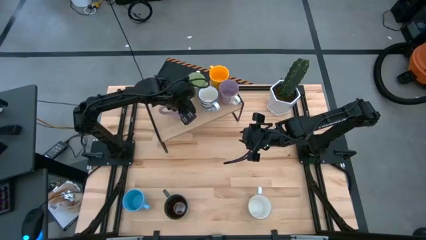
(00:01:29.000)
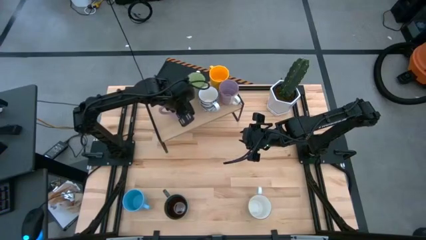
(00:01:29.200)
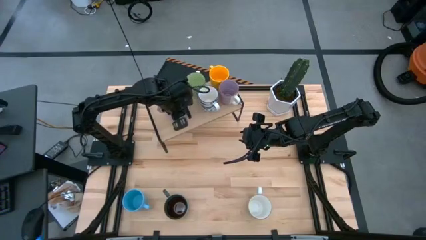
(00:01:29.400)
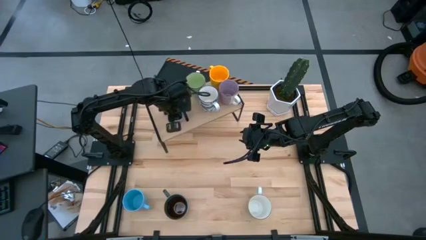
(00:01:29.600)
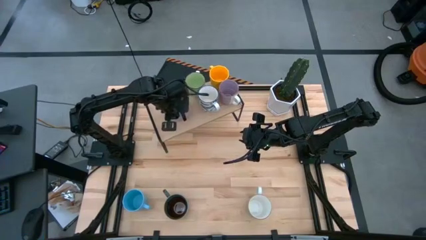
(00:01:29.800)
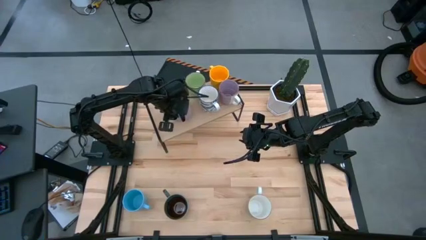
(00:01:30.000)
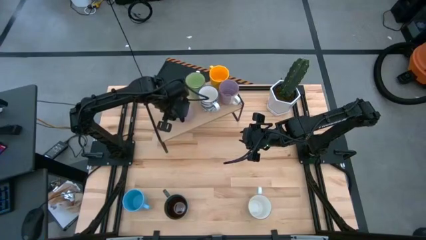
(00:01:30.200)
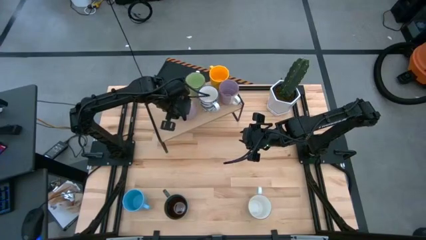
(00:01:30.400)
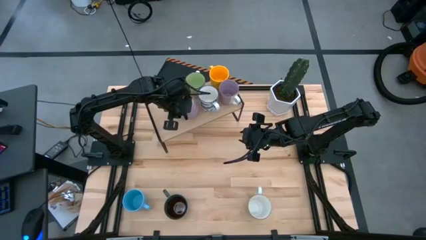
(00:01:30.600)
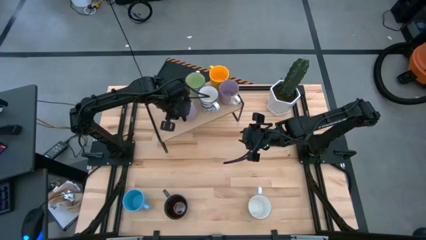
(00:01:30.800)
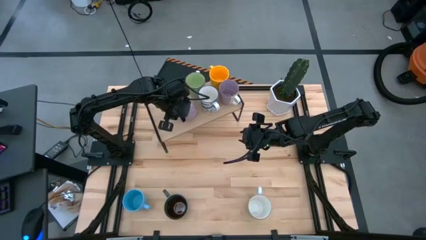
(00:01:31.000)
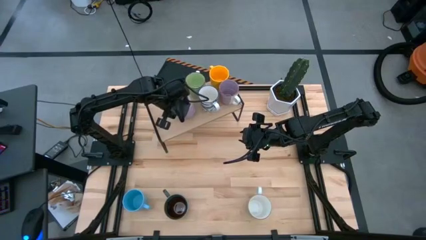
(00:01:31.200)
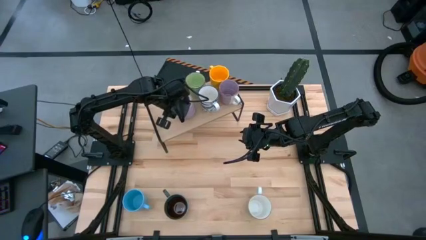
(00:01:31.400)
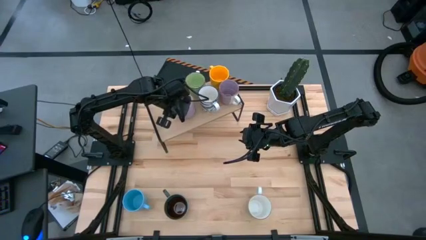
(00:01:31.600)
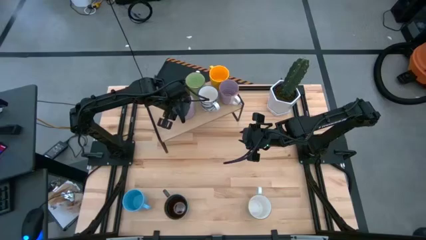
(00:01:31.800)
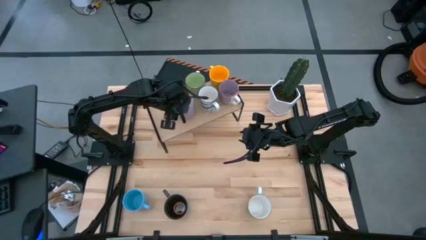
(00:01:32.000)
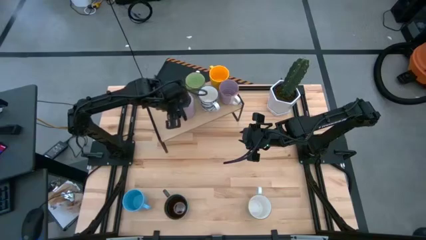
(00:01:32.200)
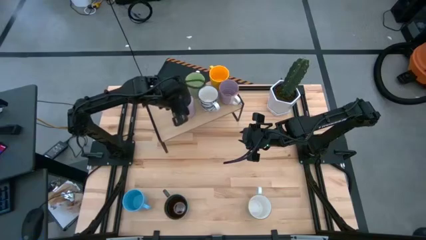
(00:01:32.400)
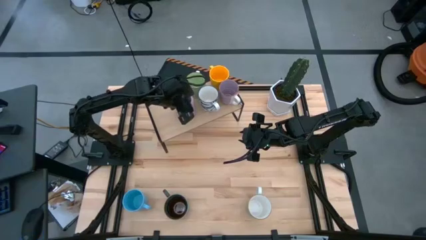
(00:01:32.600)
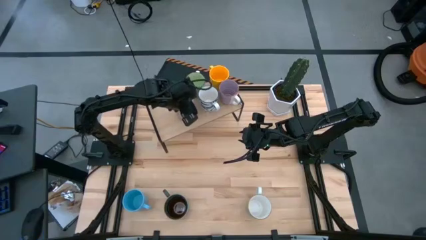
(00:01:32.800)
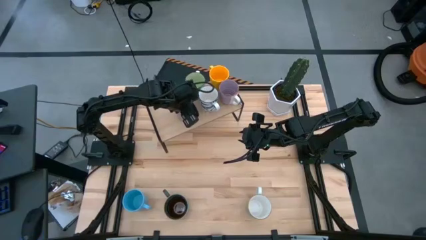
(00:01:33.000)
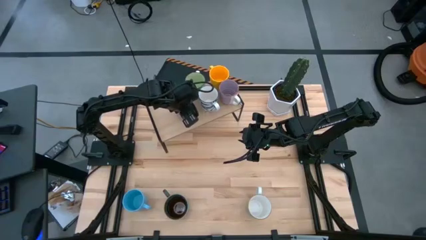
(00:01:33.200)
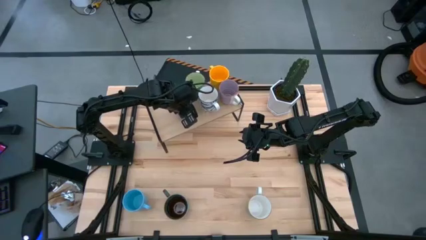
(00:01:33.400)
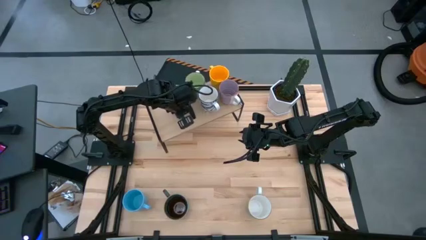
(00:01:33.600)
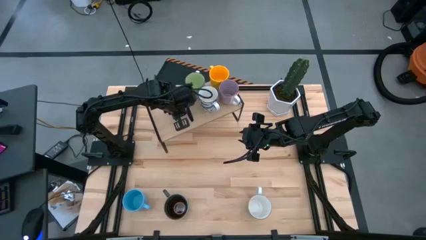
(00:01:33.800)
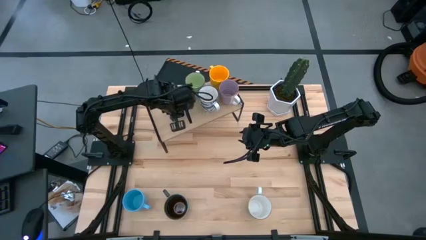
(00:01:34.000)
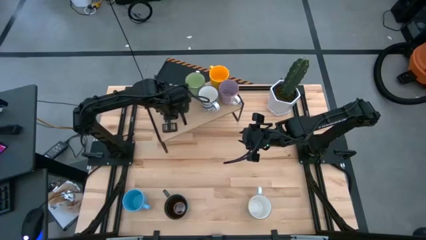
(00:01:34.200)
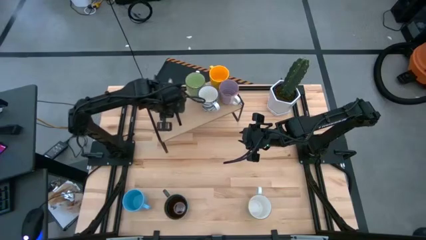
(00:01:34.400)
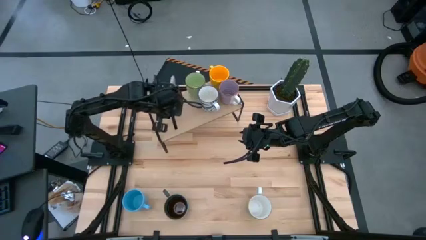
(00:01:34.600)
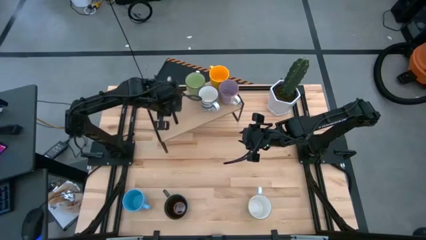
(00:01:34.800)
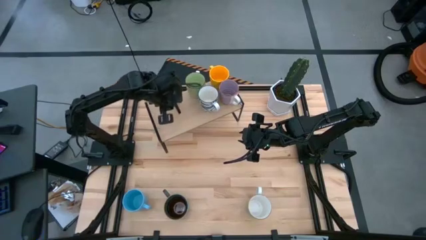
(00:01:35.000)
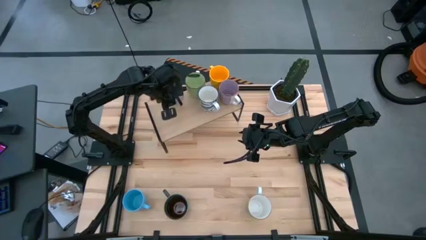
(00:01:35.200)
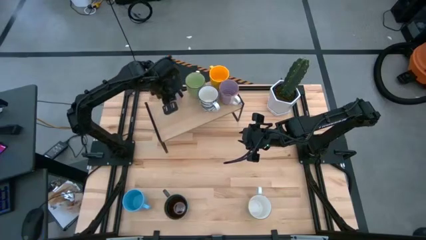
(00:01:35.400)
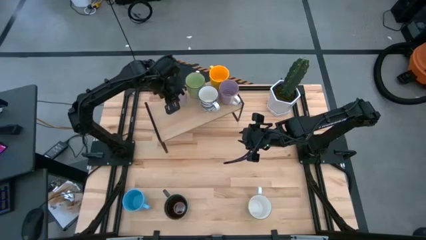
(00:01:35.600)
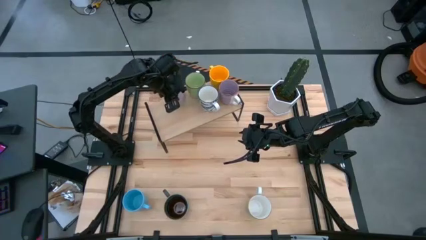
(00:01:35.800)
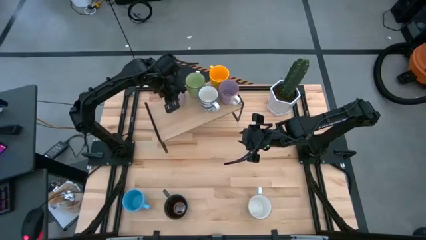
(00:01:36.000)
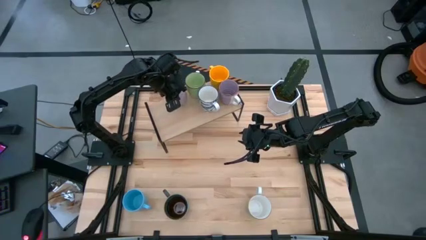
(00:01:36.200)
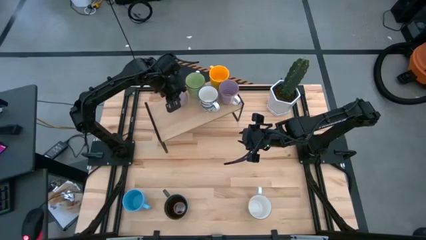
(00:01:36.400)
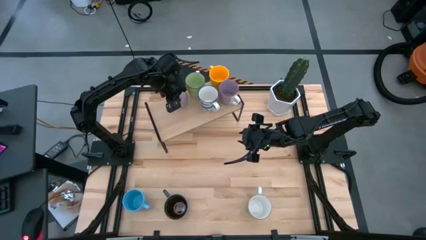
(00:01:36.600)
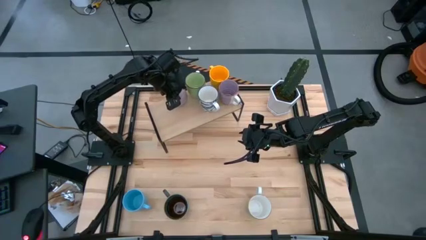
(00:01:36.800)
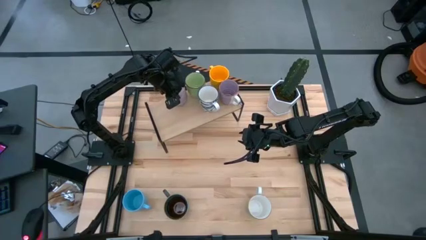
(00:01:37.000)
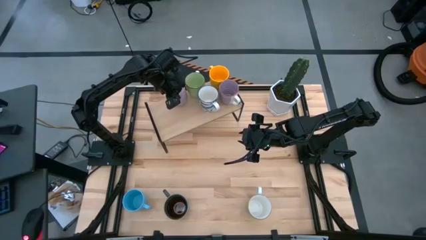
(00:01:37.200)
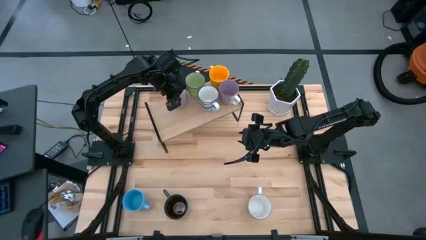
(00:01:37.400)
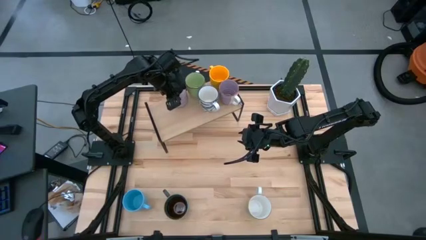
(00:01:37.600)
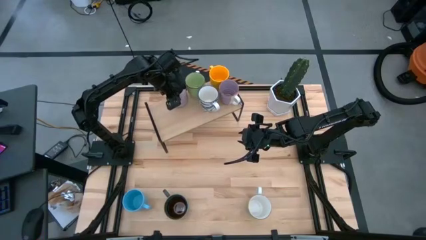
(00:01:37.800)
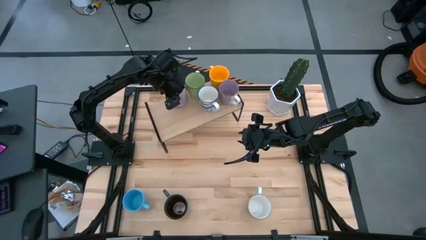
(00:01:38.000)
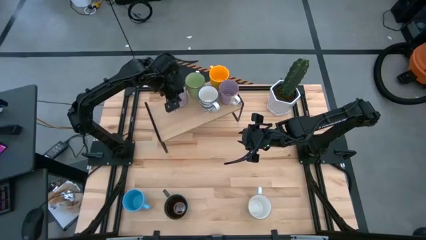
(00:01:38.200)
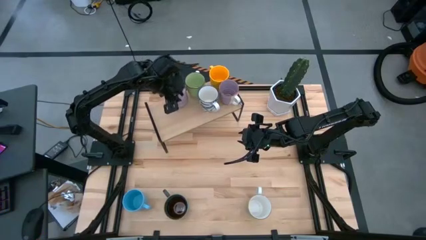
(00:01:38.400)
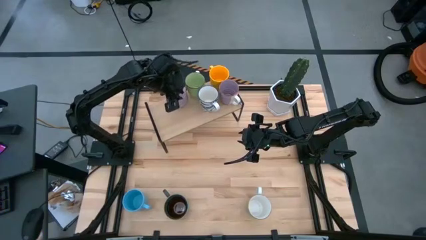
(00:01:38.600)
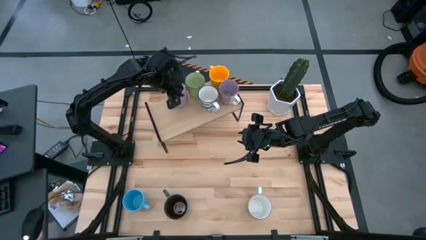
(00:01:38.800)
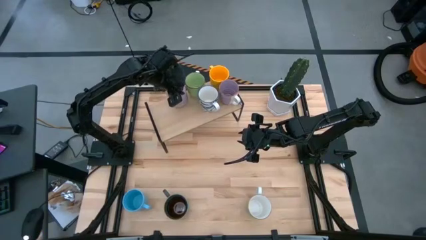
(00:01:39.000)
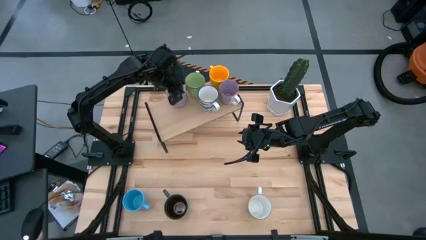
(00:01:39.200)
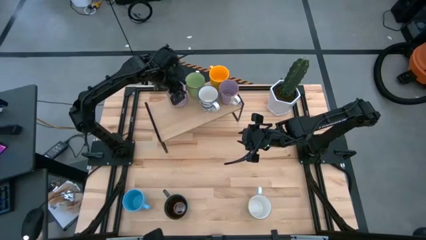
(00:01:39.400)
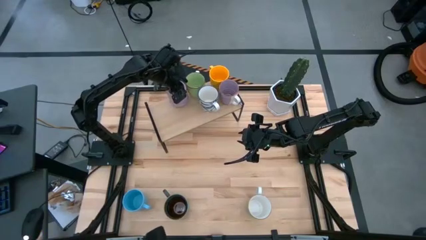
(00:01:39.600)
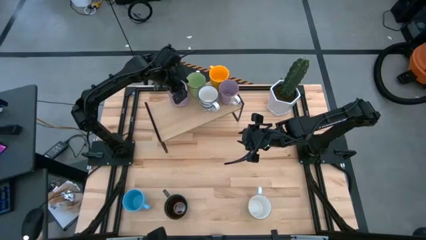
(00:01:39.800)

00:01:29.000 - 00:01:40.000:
Task: Place coffee mugs
Put the purple mug on the shelf
